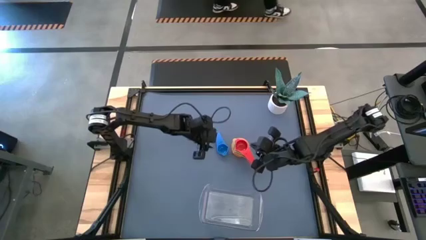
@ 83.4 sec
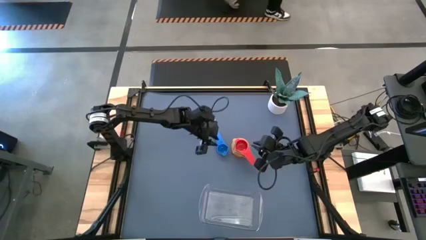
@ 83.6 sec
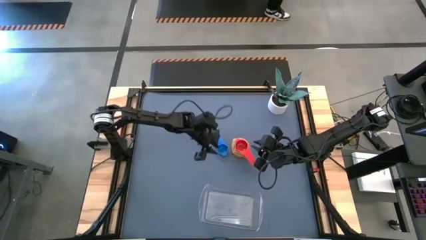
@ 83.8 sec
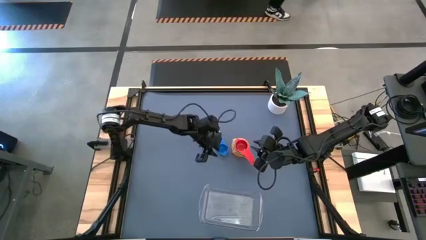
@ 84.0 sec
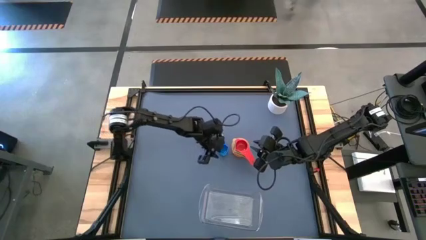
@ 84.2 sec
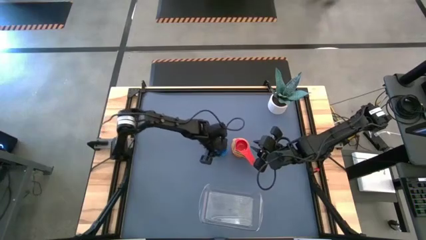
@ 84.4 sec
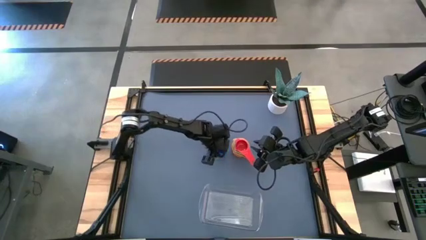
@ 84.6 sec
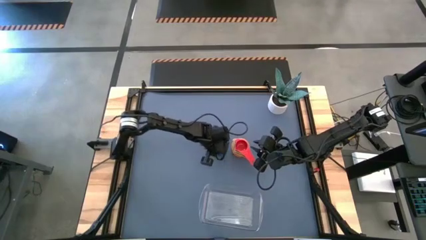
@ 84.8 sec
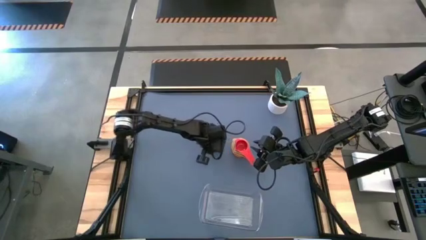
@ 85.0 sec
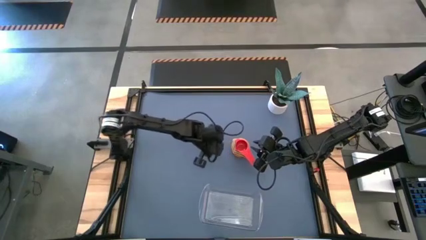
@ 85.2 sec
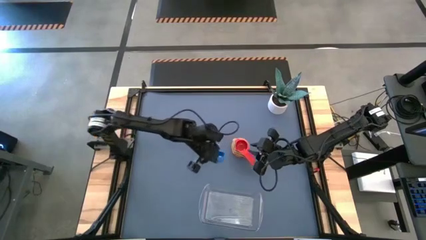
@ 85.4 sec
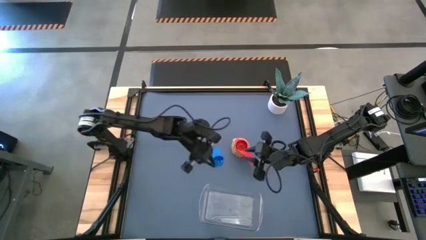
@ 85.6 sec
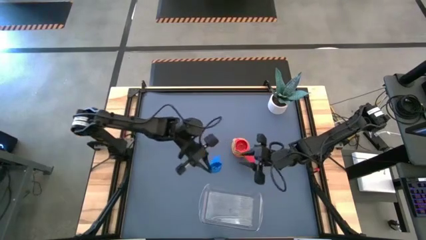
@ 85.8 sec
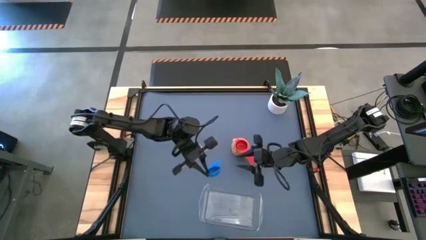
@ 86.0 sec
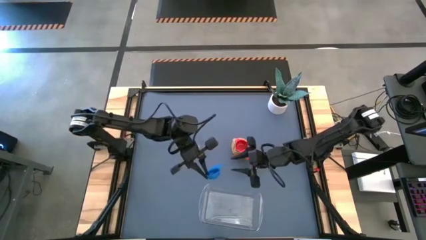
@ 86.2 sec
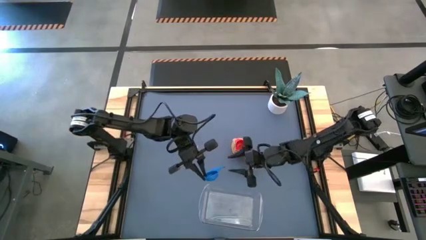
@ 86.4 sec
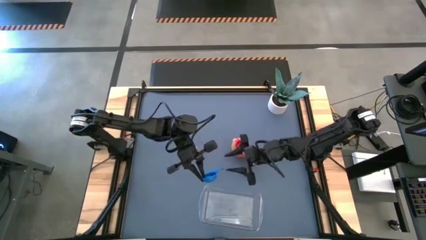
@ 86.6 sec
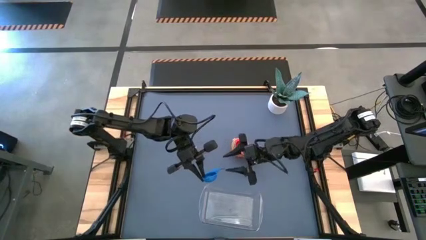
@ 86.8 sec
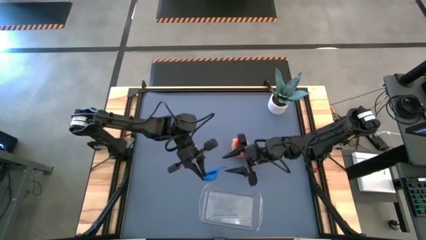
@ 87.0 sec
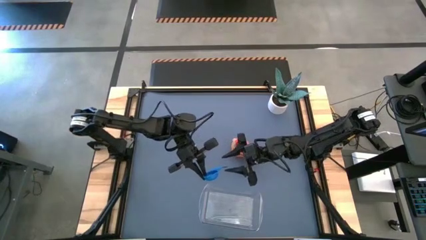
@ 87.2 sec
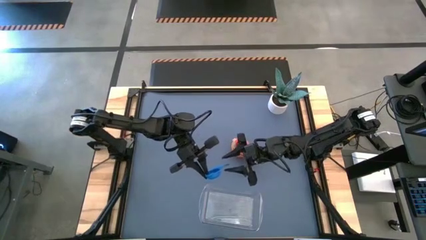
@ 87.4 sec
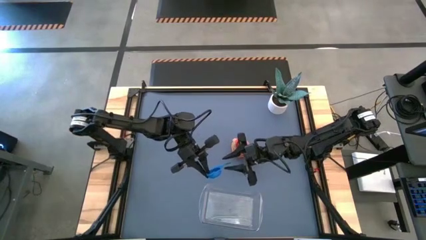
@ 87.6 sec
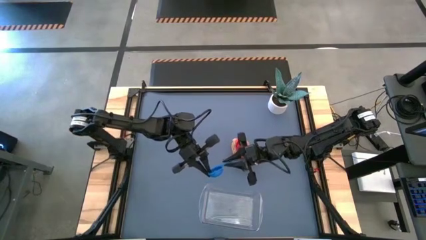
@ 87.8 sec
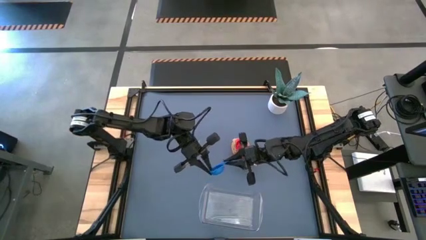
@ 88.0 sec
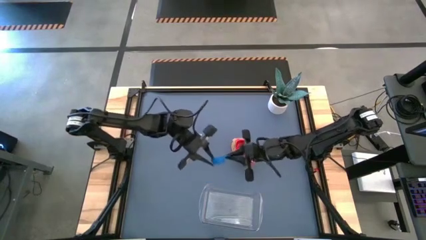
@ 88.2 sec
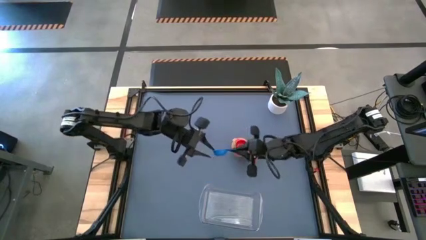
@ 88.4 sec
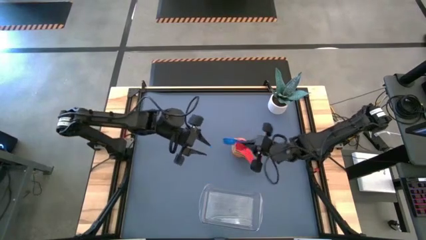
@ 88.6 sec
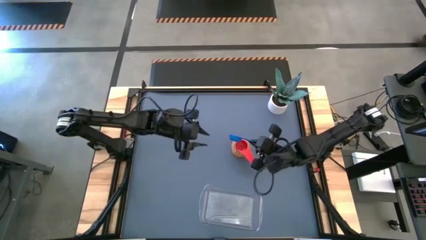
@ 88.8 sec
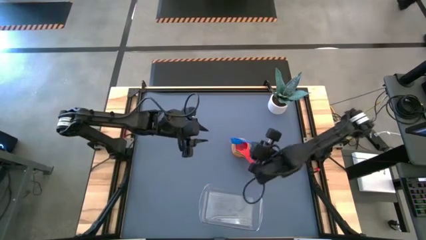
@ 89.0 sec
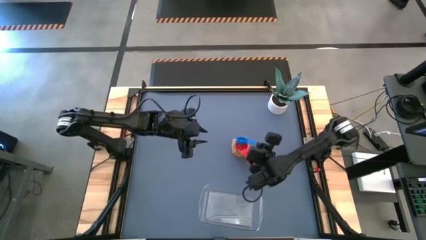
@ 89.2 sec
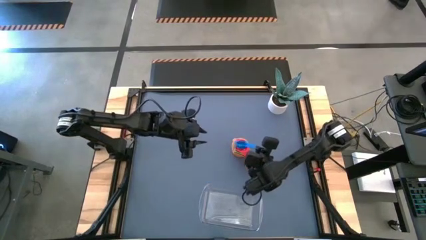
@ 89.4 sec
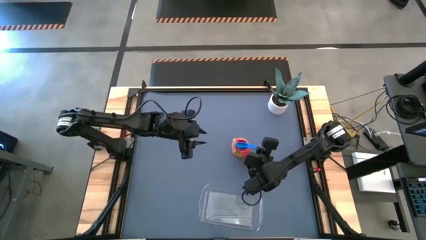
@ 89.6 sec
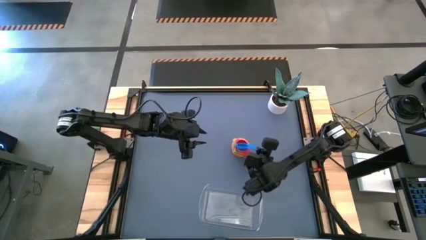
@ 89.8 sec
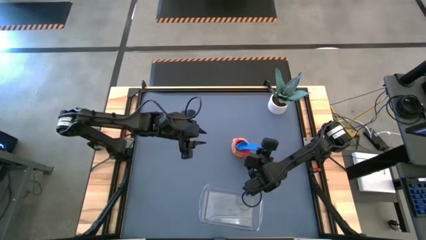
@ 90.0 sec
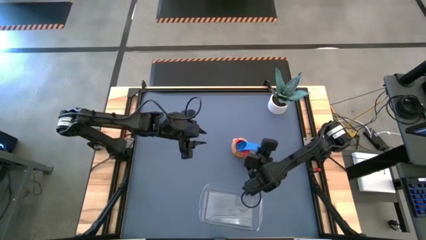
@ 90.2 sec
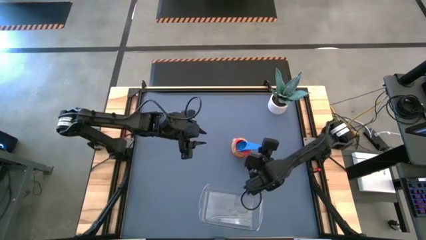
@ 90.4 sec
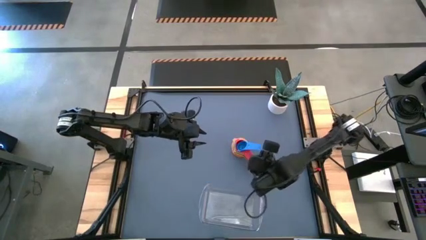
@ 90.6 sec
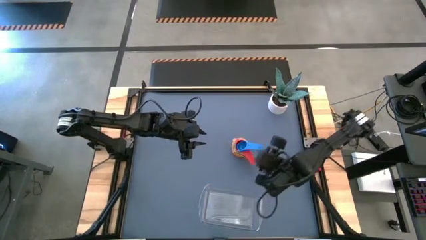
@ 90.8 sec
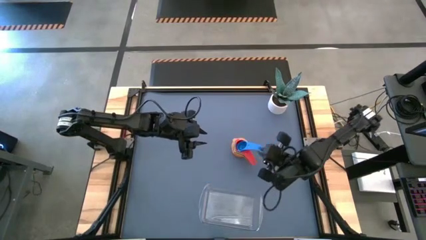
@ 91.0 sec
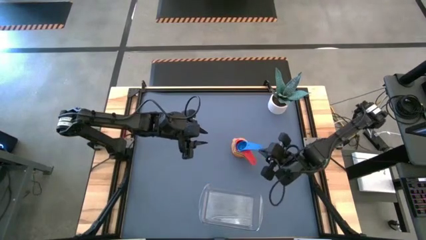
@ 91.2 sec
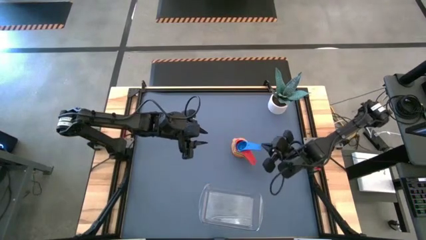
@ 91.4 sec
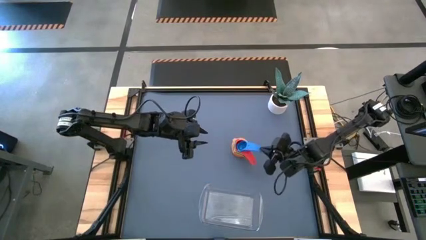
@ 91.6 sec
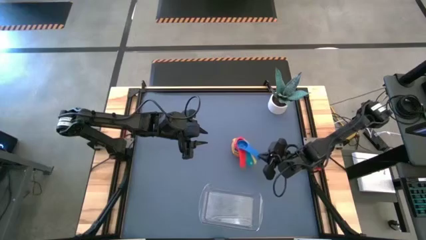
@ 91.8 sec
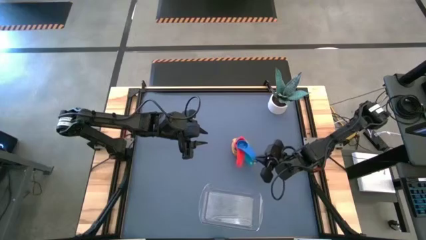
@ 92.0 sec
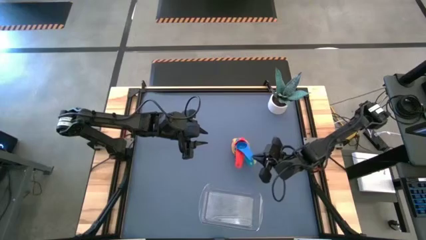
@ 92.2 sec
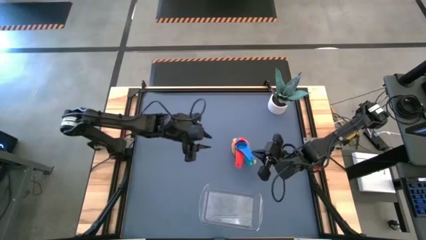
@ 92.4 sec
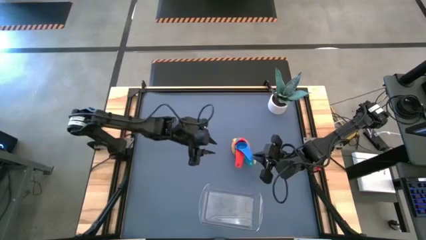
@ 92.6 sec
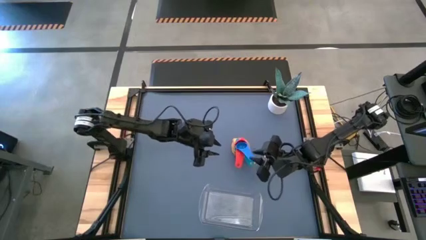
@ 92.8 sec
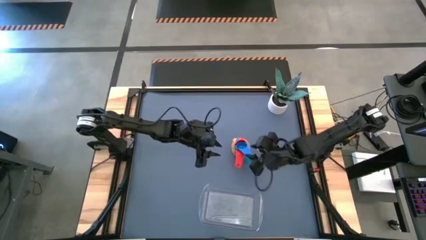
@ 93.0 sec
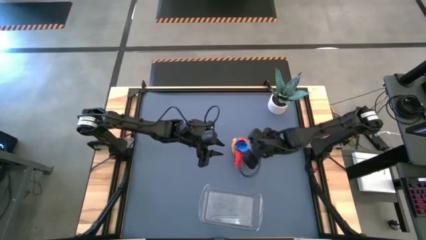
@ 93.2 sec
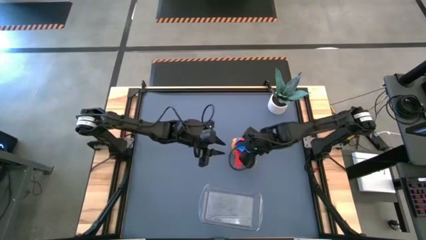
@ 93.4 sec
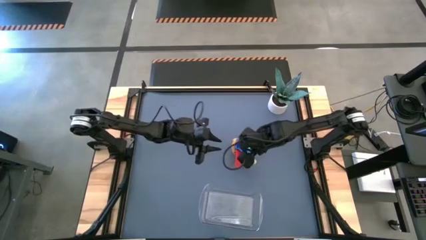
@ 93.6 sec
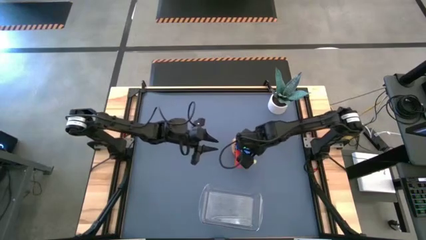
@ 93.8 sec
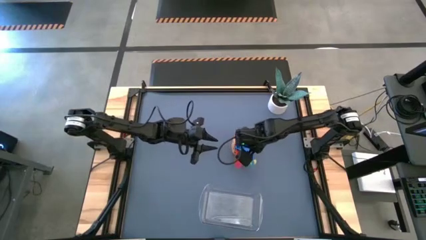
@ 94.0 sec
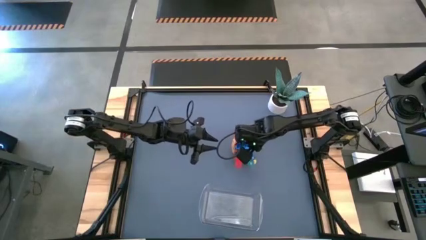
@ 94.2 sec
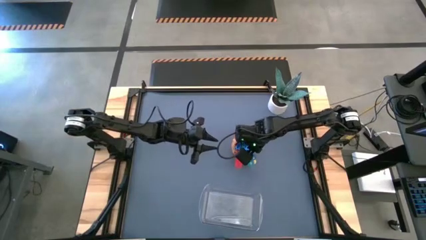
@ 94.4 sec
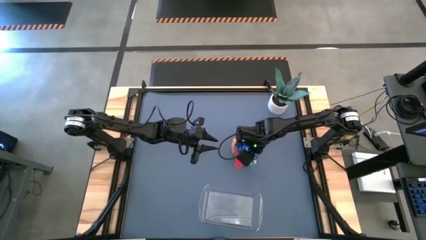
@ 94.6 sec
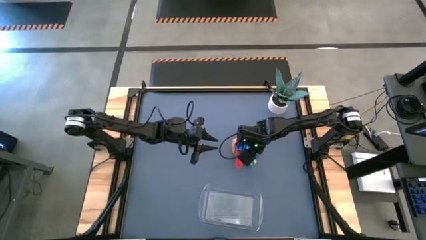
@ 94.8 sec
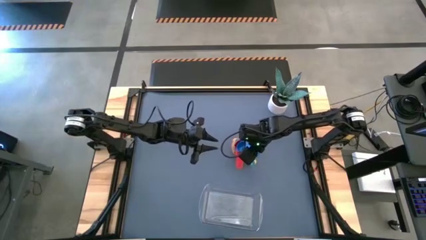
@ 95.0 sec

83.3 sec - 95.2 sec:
Task: Nest measuring cups in basket
Stack the blue measuring cup on top of the orange measuring cup

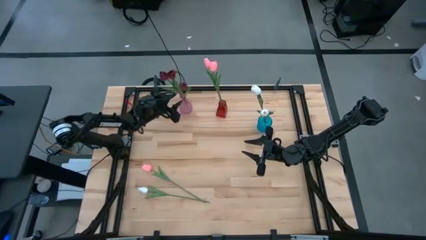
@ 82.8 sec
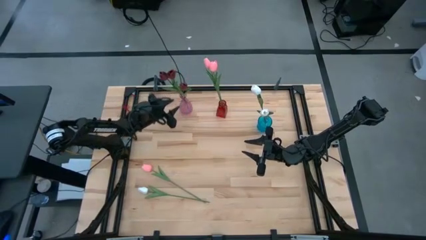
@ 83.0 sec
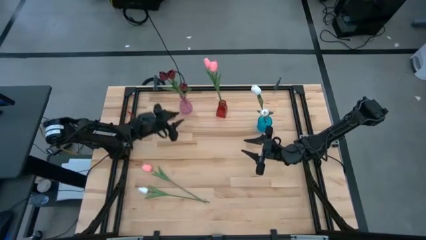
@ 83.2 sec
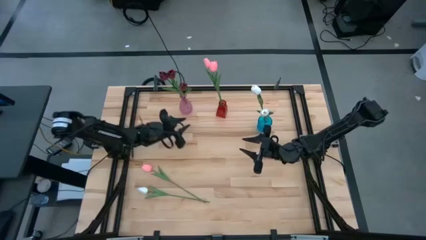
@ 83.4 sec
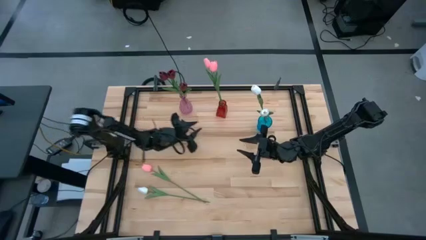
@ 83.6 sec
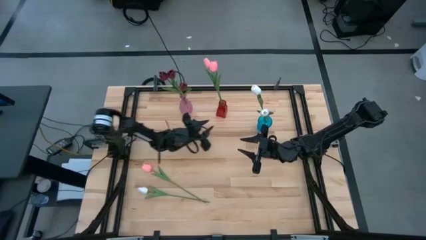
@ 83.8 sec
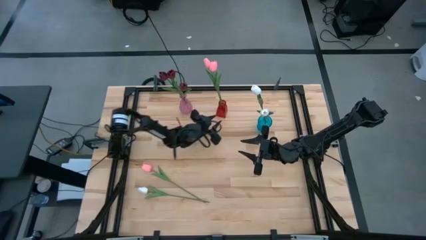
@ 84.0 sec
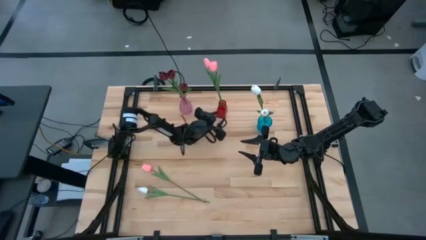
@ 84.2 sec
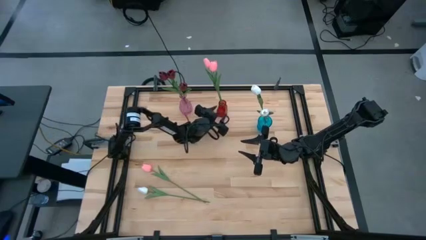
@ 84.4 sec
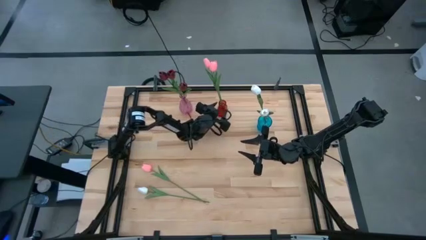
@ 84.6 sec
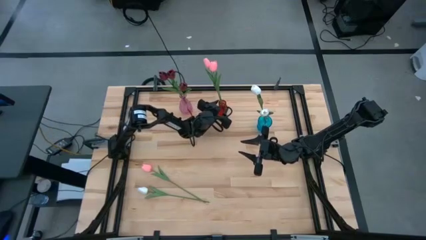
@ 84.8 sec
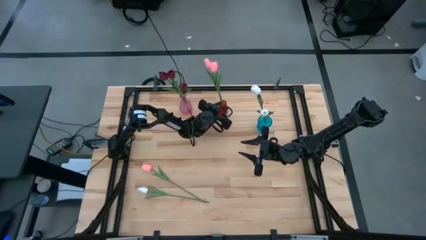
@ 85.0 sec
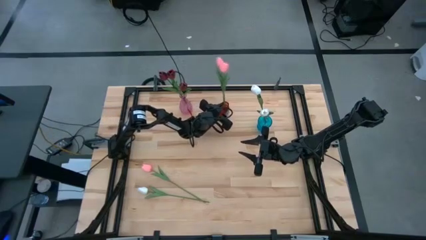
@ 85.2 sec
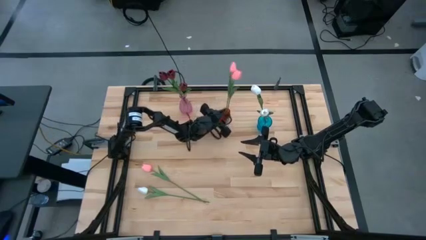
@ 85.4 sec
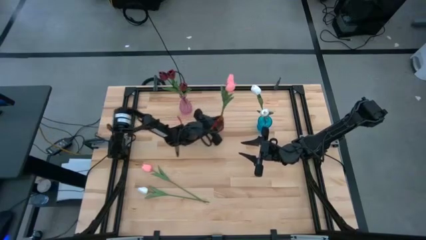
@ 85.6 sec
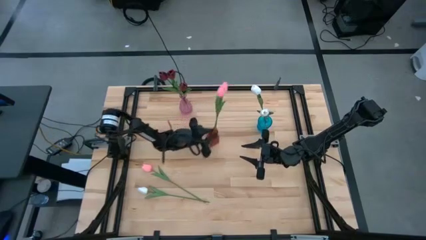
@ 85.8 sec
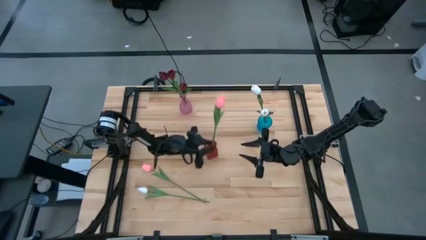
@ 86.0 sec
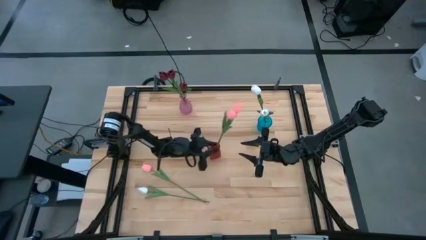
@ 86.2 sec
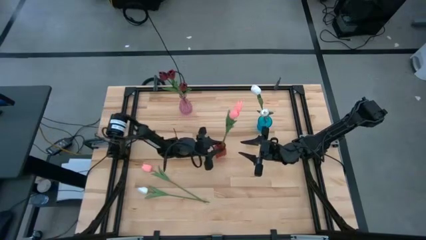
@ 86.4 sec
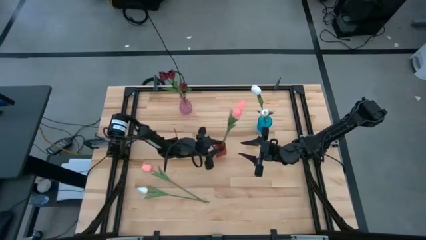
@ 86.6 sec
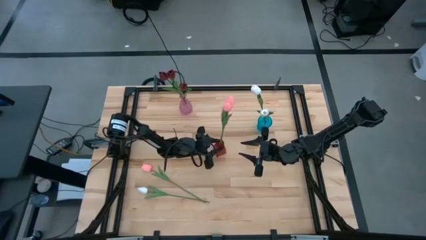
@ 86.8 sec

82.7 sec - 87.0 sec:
Task: Sort flowers into vase by color
Move the red vase to the center of the table
